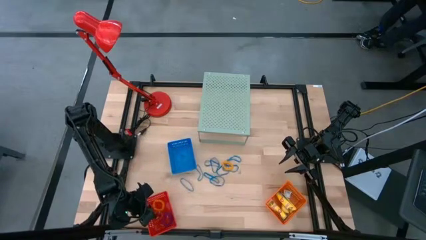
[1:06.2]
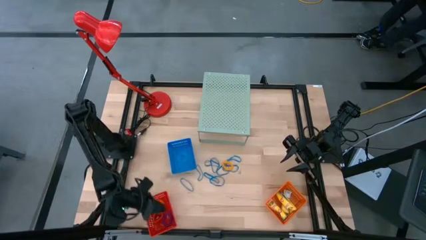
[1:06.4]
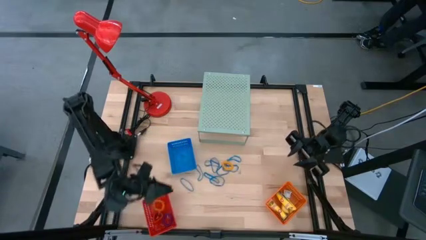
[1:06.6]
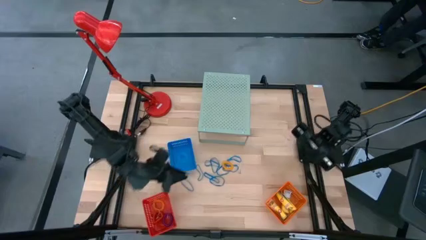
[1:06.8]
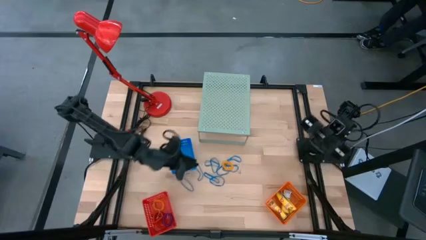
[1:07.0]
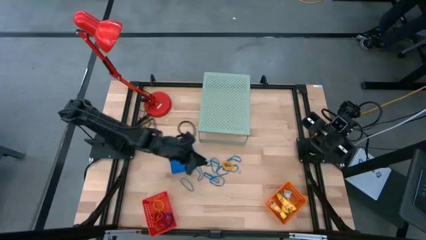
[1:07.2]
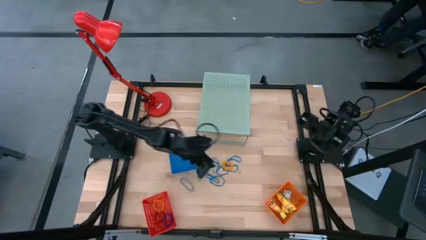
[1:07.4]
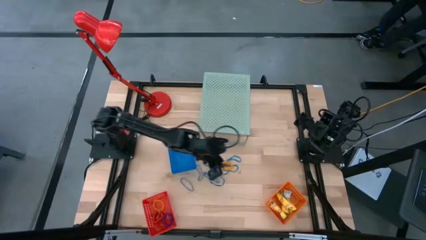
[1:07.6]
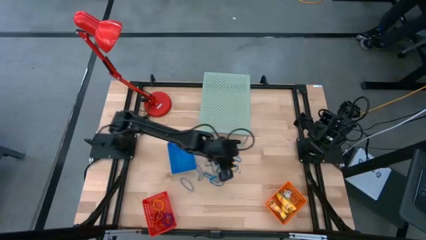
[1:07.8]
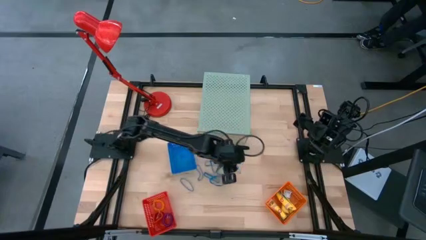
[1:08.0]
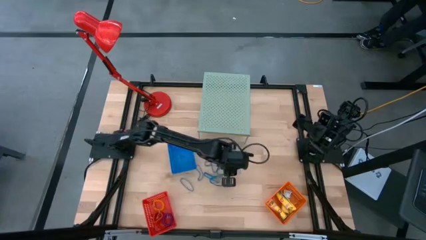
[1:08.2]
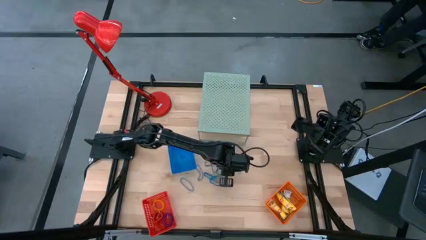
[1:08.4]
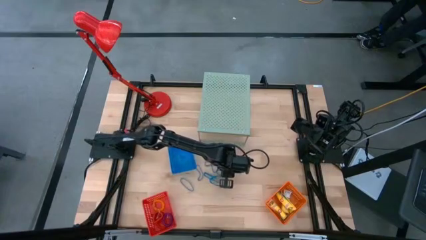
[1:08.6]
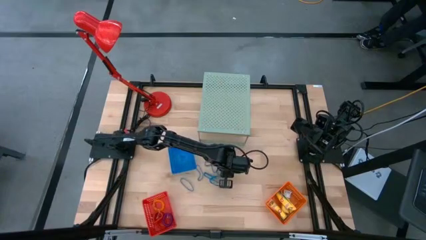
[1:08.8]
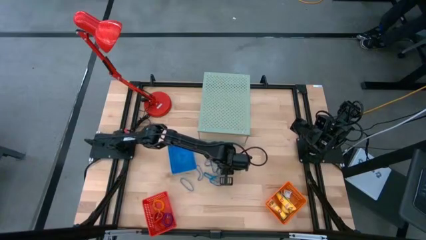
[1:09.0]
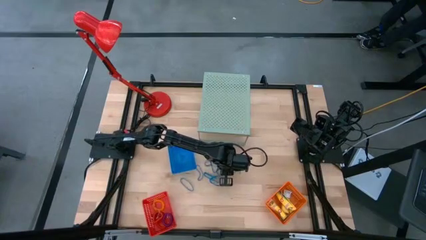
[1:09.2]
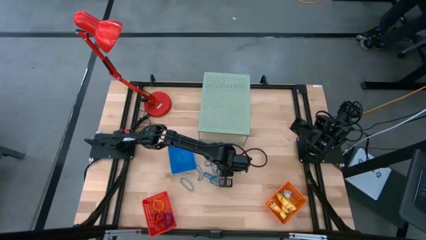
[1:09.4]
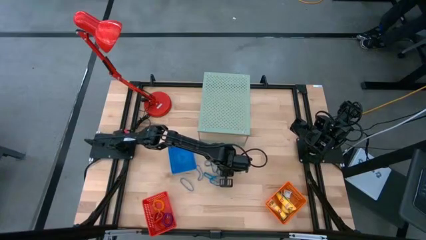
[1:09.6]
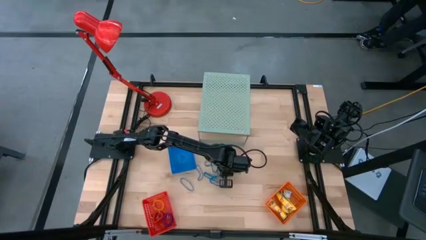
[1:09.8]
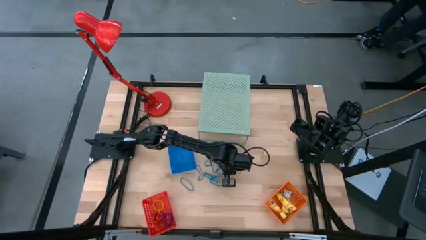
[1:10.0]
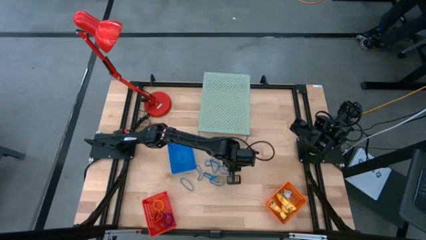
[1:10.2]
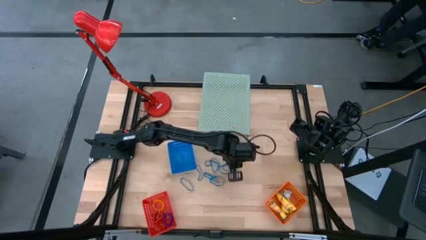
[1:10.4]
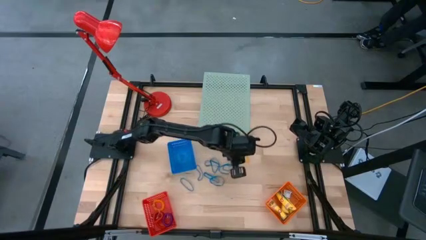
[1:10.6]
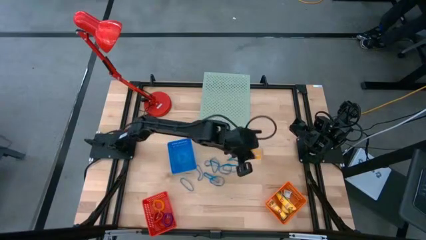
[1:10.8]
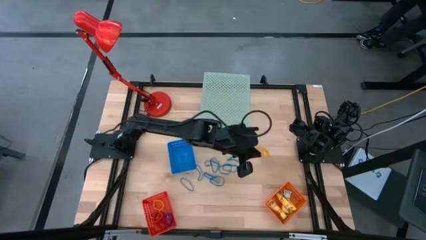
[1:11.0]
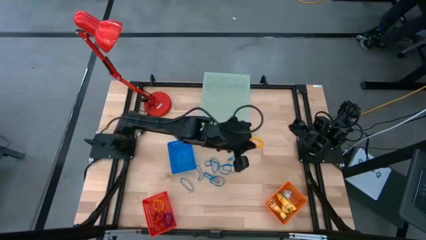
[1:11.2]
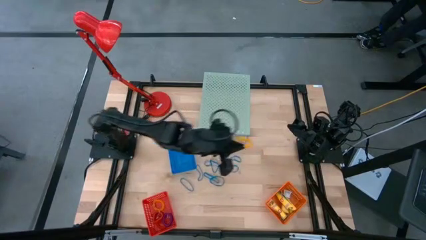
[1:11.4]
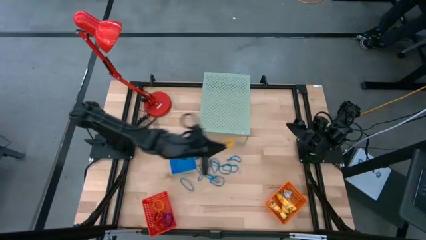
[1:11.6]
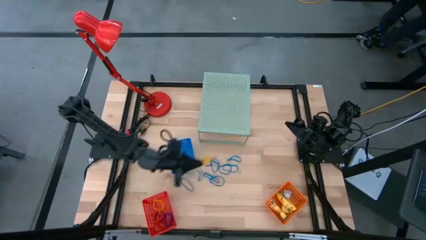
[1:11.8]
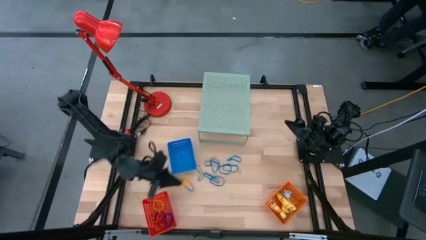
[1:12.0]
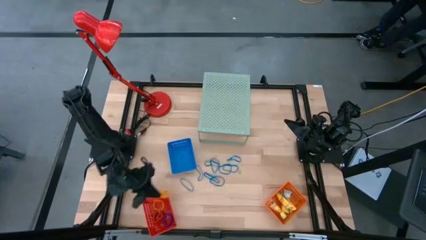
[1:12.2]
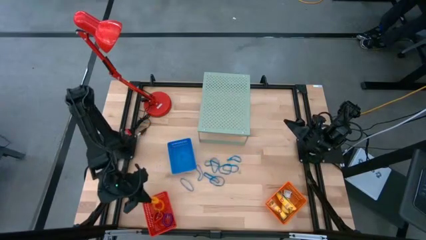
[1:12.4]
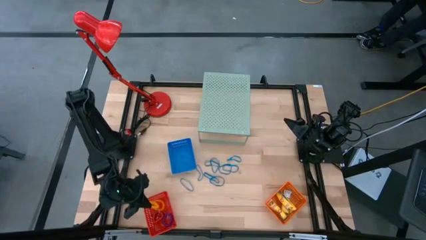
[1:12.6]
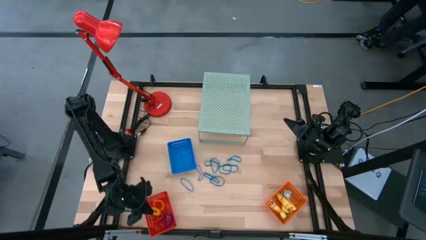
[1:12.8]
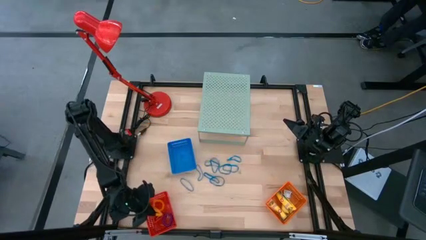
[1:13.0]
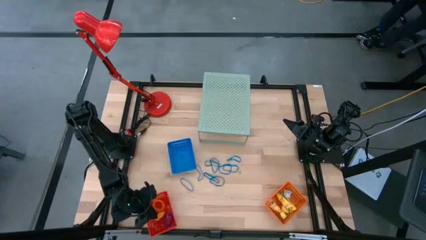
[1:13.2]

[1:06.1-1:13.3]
Task: Pick & Place Office Desk Supplies
Put the yellow spring keychain into the red basket

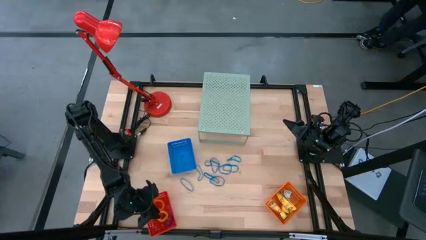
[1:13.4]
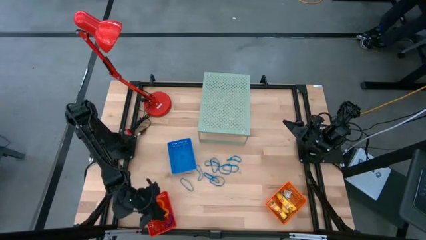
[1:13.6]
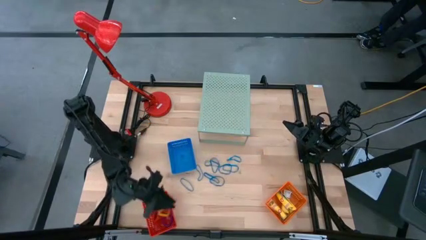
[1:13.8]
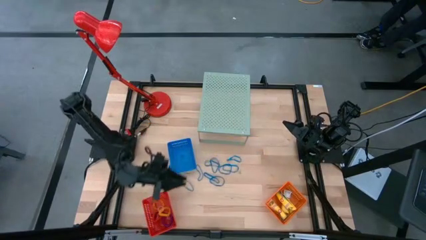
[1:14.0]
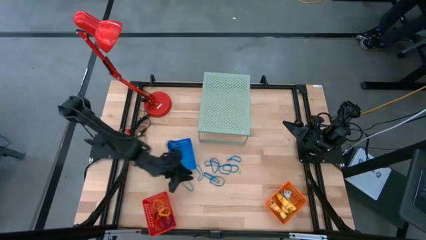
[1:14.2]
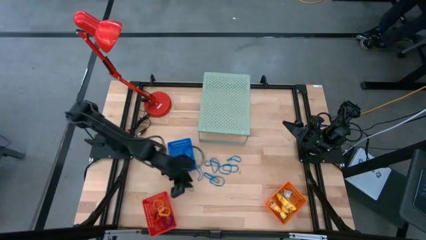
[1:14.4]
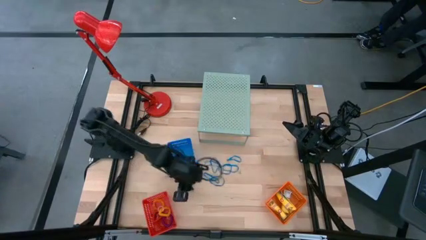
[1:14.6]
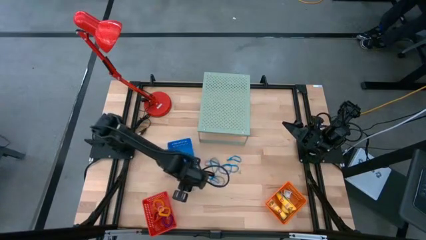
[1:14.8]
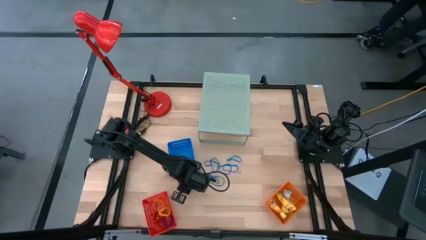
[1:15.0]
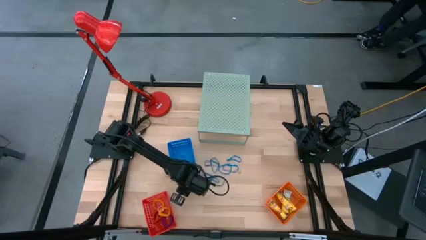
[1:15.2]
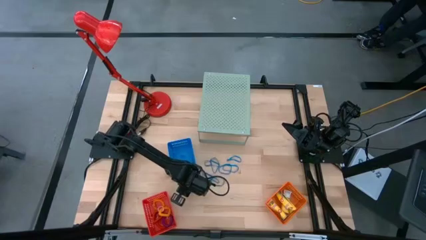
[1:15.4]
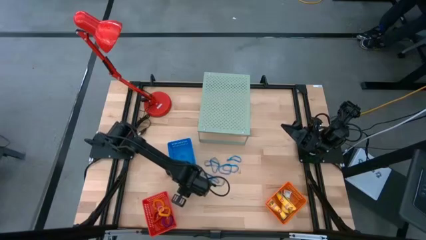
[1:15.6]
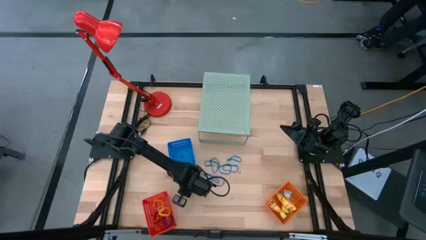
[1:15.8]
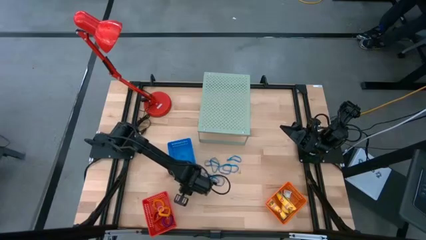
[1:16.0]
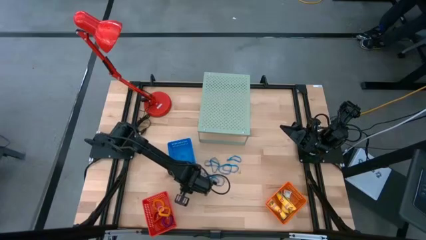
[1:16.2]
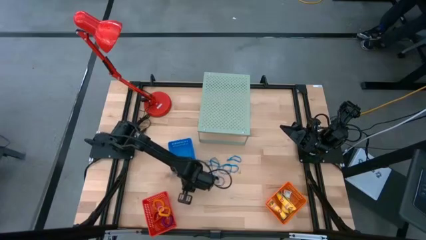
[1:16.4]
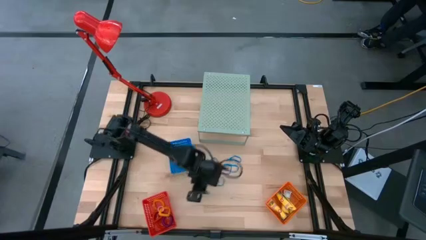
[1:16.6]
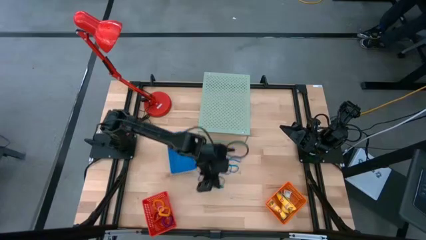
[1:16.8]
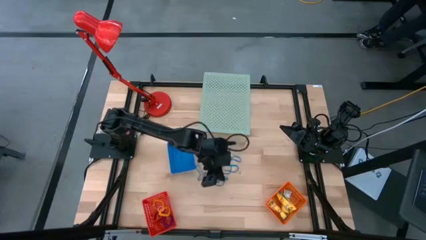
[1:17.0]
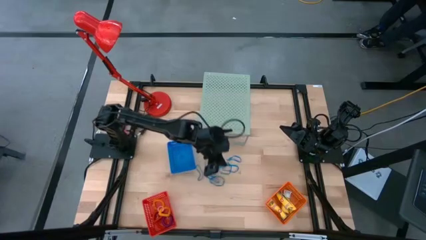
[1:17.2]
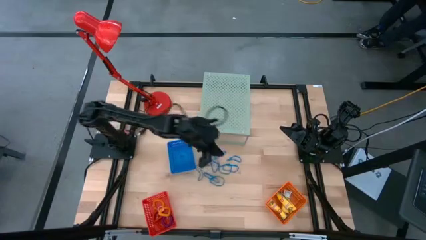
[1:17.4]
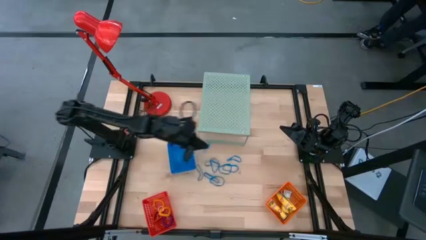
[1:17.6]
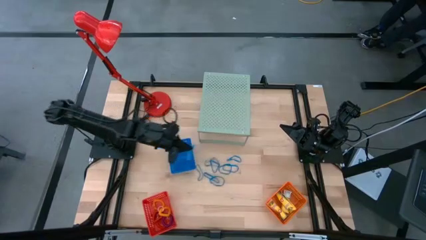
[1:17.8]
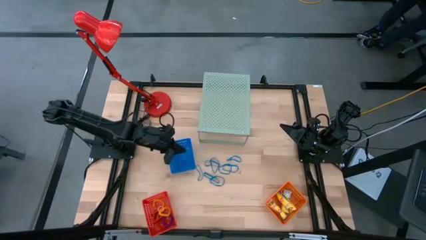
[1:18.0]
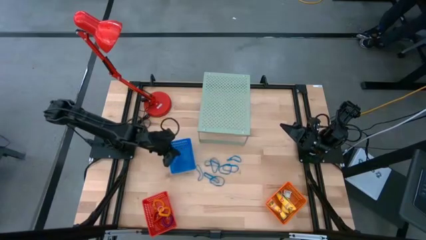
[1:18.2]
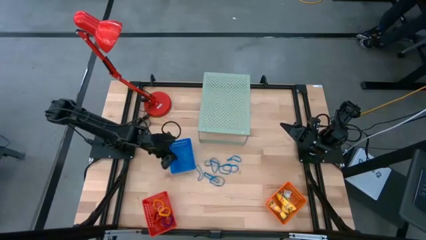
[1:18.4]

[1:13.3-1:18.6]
Put the blue rubber band into the blue basket

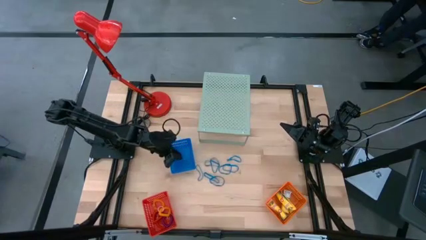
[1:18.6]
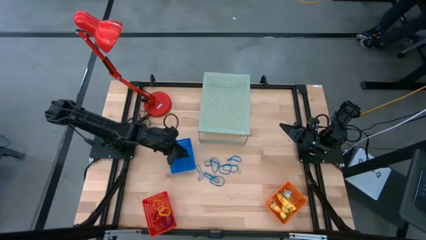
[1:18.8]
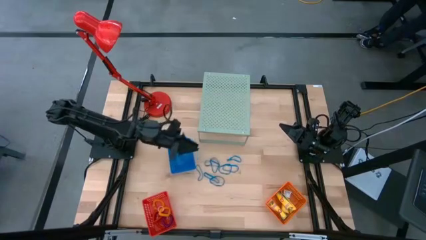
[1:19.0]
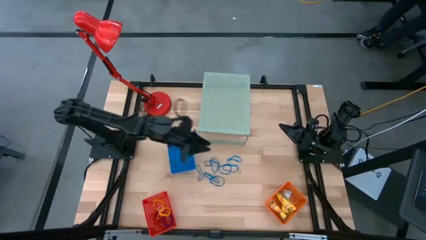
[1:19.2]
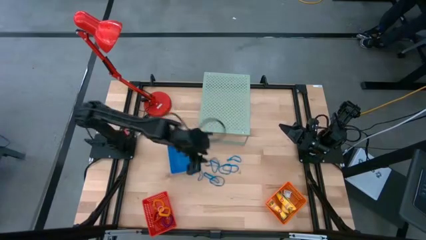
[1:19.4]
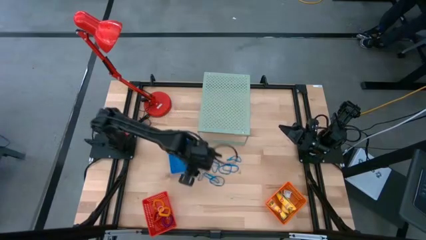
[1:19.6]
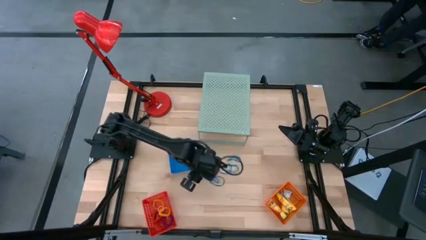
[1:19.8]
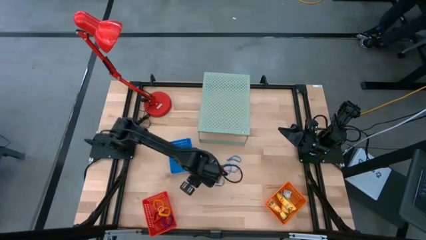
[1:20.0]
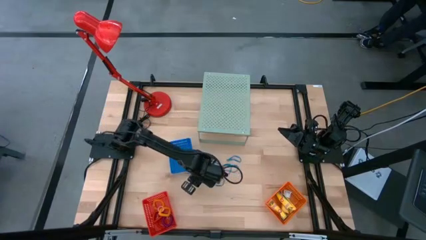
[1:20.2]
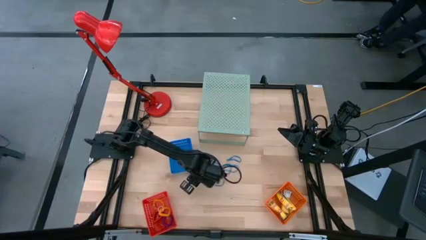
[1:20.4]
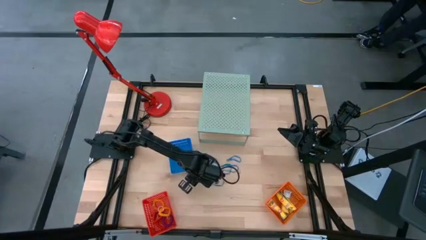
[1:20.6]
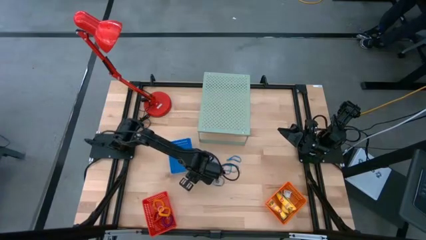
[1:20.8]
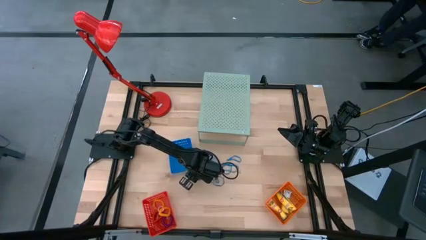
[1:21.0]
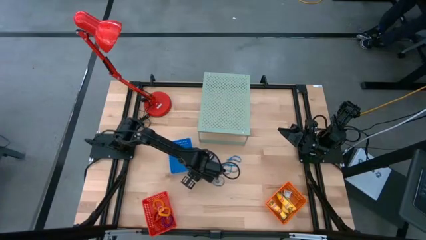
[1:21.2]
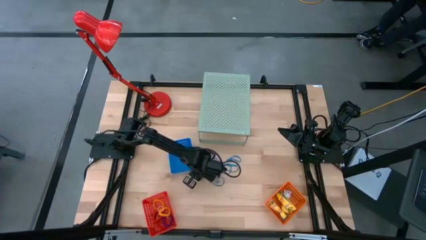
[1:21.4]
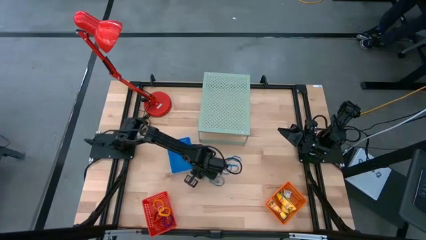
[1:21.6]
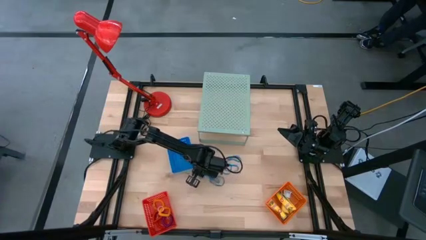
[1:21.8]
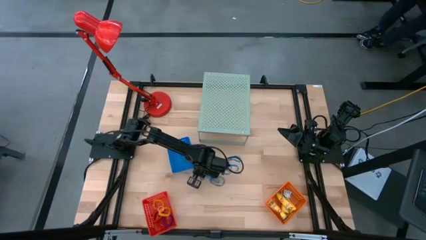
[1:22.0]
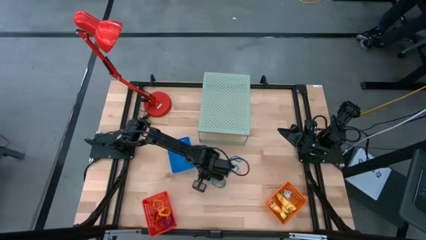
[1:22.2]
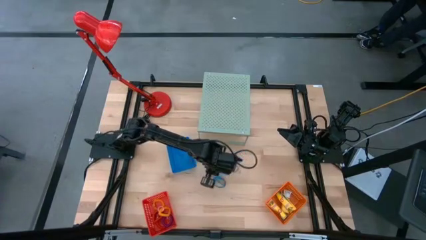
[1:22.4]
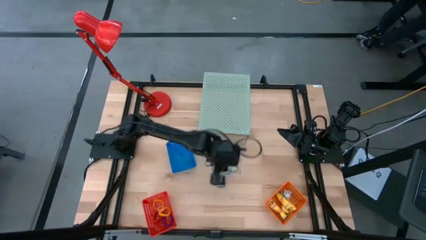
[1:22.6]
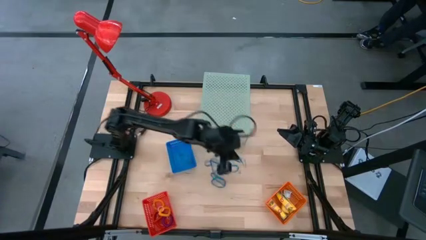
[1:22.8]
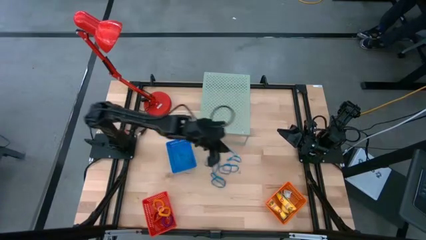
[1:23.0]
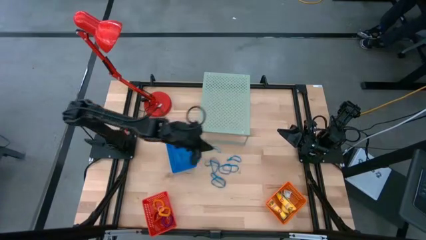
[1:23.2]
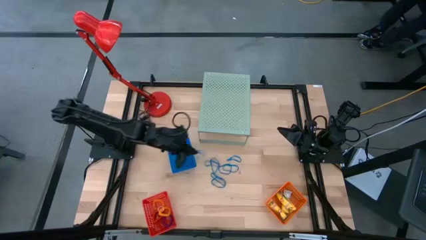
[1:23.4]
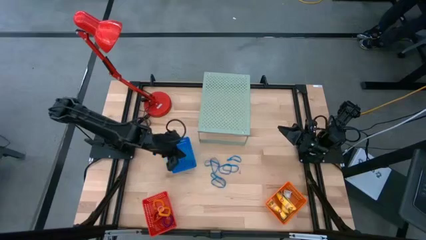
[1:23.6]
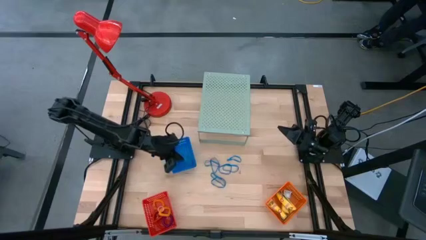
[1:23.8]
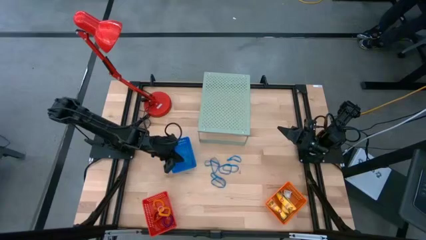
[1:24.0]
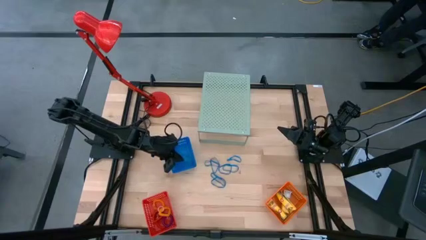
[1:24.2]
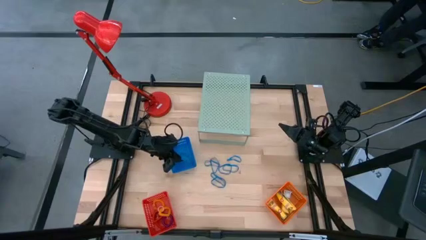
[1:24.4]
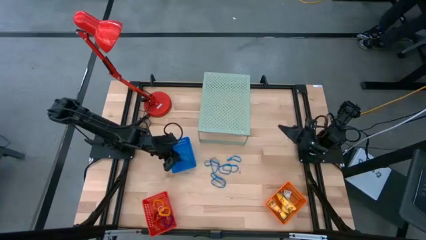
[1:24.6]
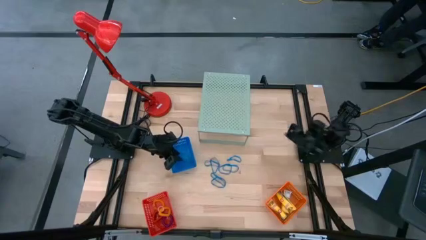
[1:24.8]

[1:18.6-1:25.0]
Put the blue rubber band into the blue basket
